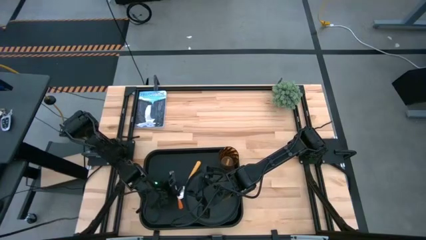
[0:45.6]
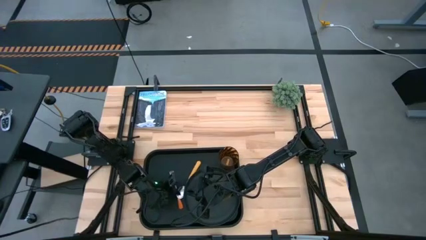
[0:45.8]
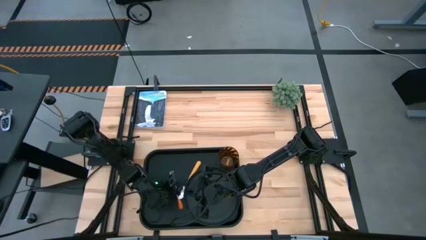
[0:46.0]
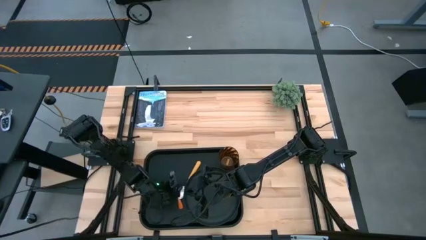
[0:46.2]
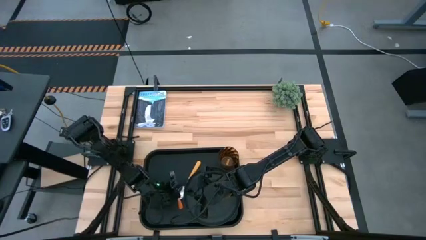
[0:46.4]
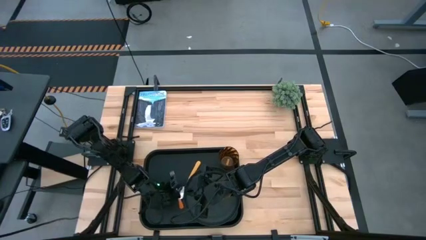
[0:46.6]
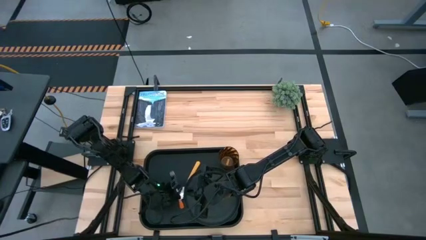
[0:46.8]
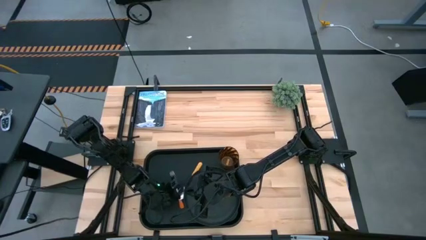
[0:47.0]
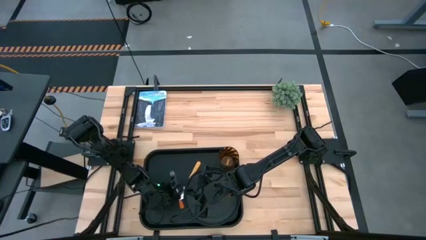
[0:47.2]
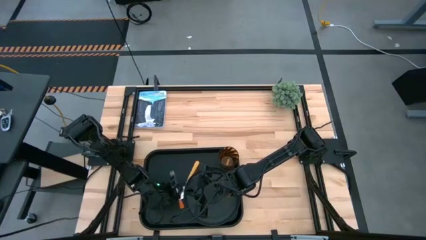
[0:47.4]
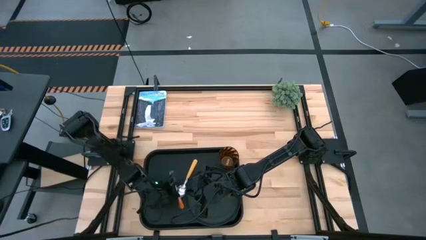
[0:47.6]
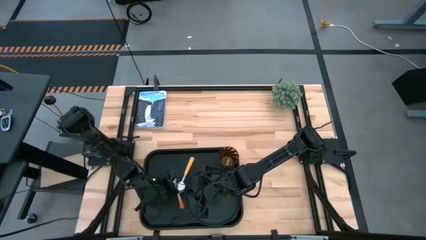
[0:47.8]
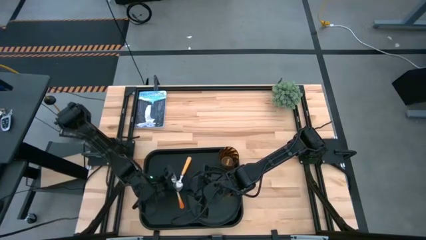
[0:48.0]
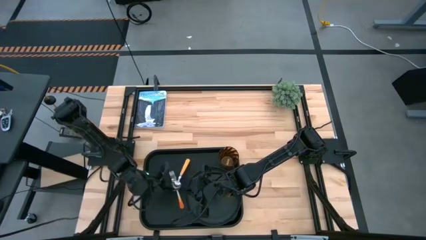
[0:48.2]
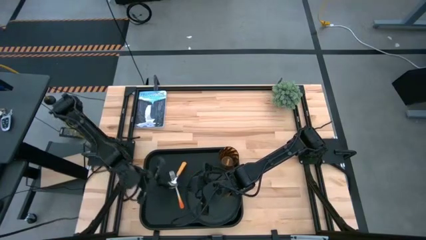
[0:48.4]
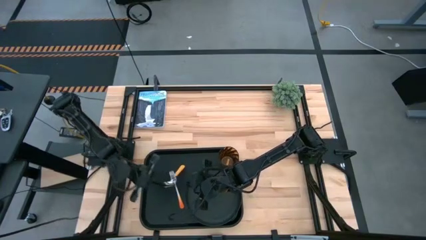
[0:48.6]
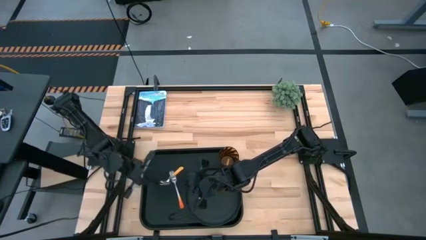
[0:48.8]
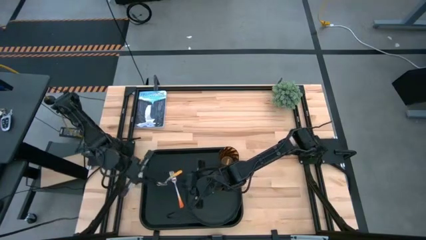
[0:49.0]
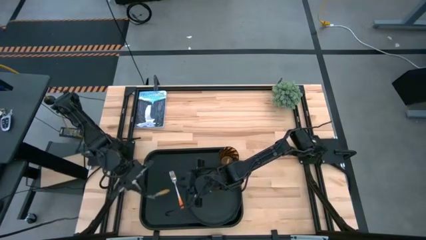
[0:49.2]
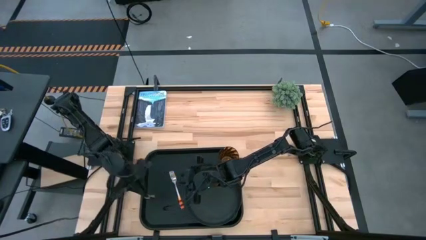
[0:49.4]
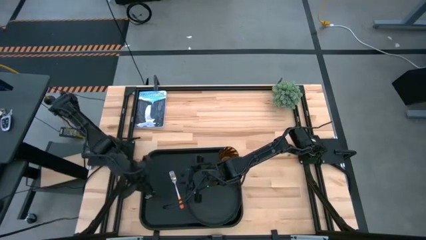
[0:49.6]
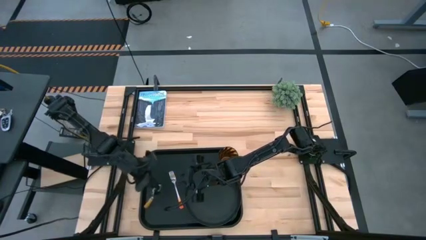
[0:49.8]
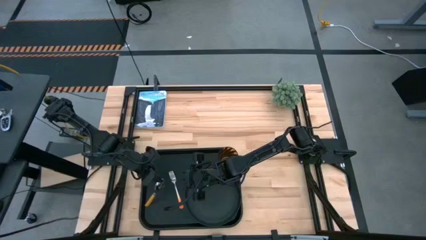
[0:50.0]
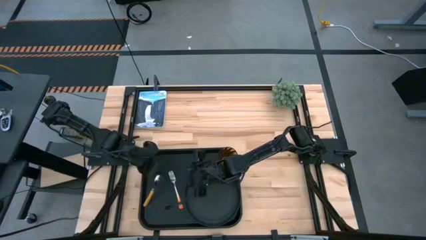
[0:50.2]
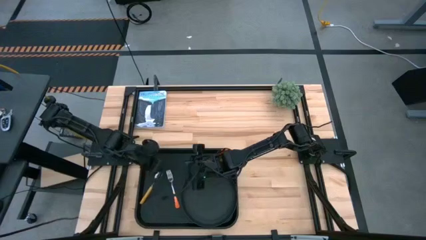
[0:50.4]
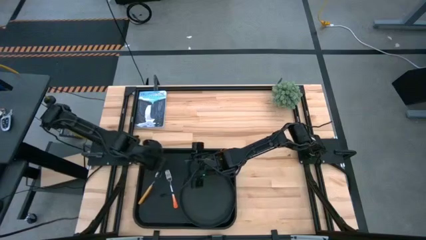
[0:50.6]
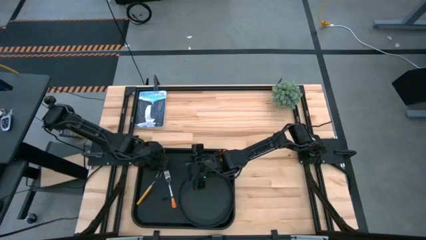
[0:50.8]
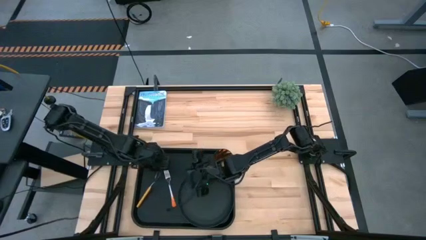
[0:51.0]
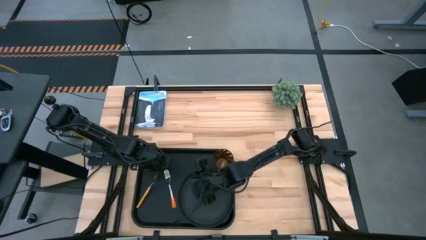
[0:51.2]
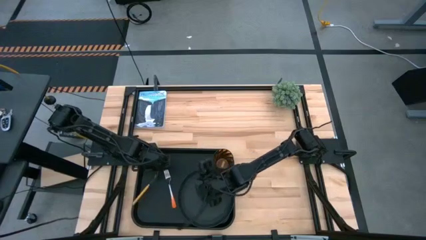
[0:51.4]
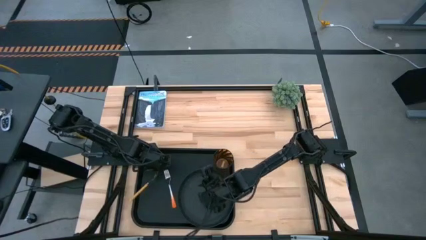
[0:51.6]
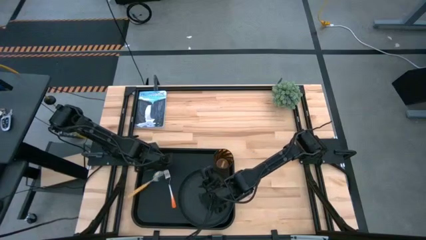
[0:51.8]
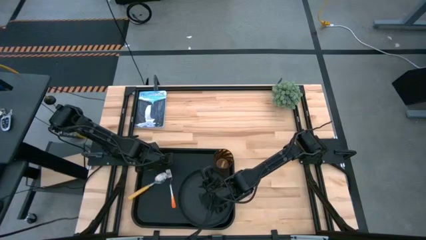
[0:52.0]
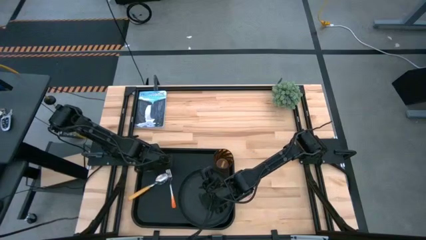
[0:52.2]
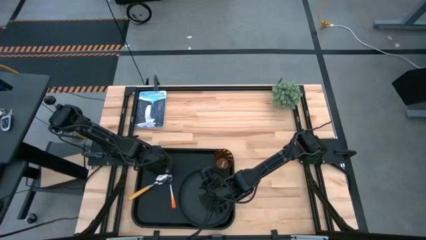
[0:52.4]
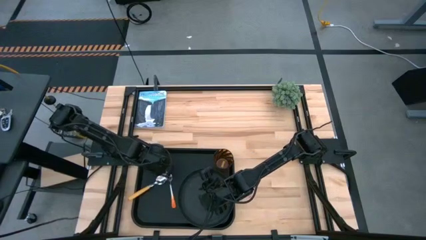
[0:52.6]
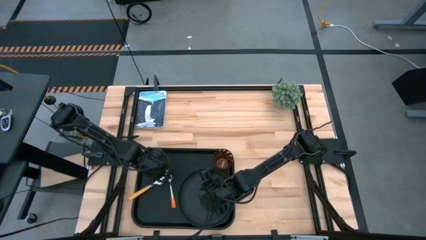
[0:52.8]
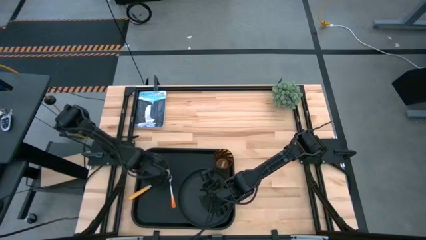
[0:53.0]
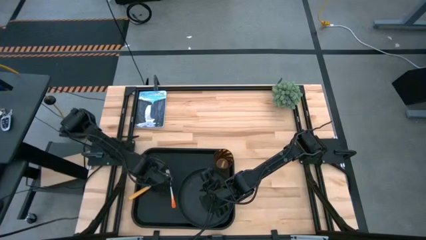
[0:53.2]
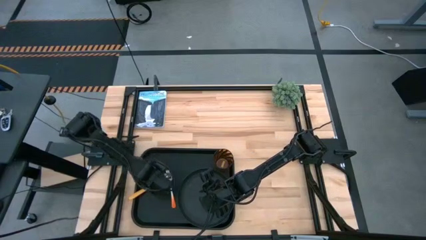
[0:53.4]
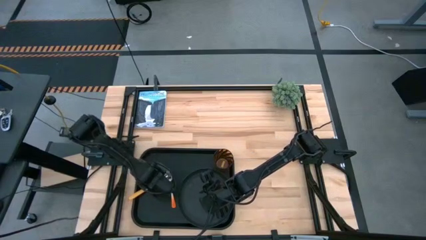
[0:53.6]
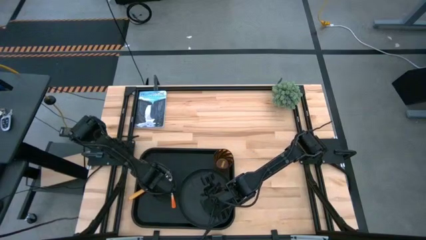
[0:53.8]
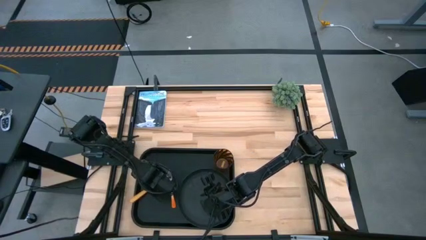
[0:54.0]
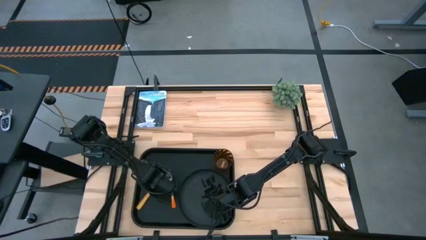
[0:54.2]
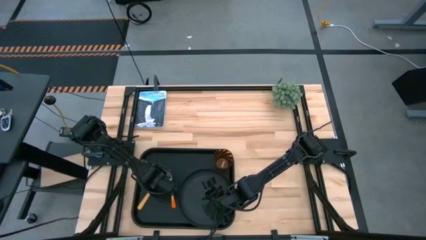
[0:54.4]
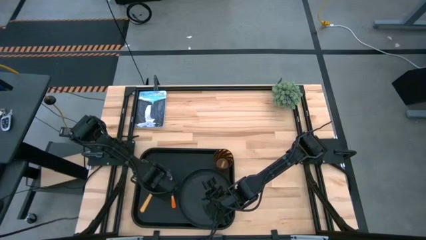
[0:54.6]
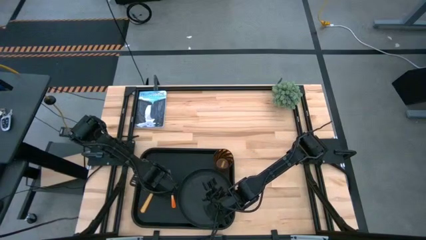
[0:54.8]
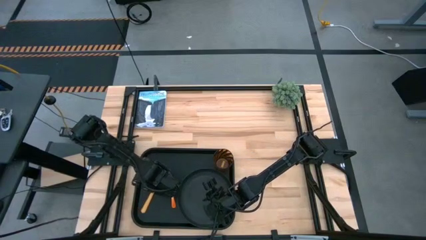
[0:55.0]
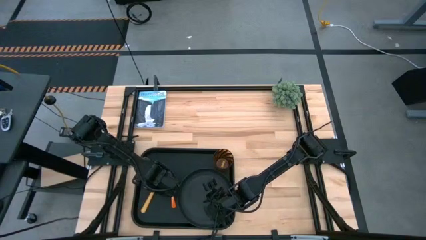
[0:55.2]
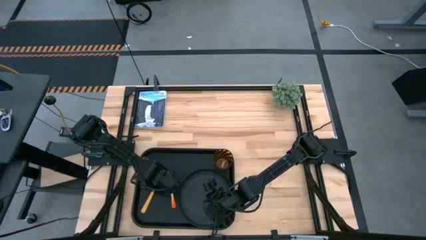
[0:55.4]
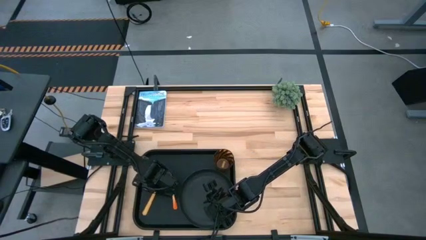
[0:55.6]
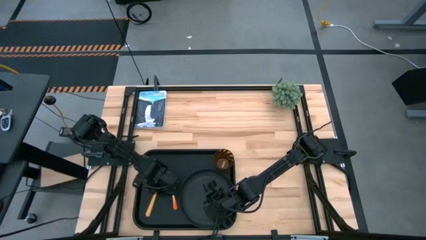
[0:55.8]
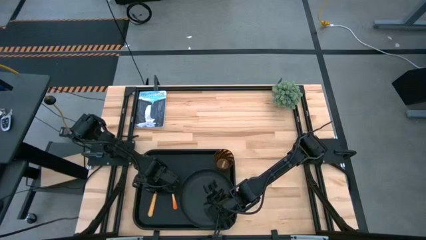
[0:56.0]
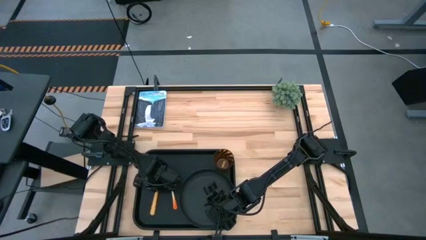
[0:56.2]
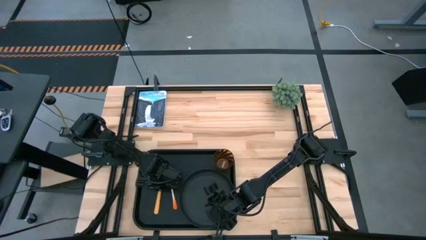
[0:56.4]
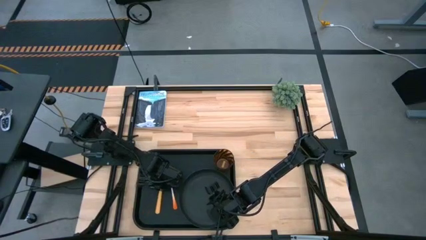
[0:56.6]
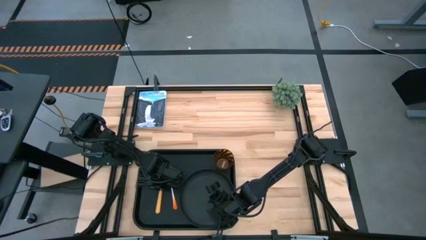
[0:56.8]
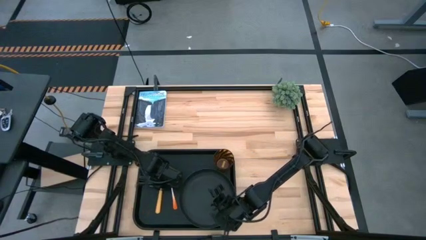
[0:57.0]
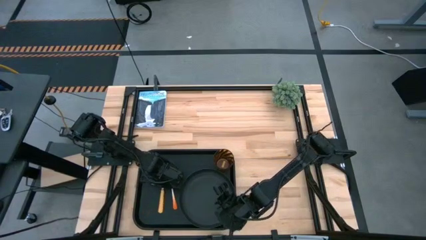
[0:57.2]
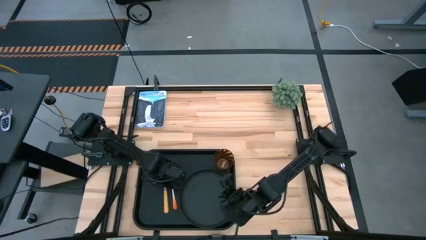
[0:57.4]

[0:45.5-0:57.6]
Task: Pick and place plate/cup/fork/spoon on tray
Put the yellow spoon to the left of the orange fork on the black tray

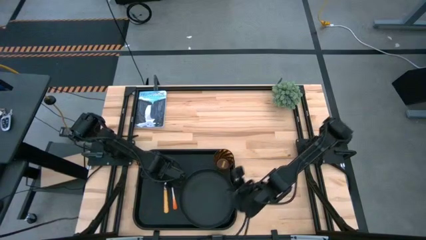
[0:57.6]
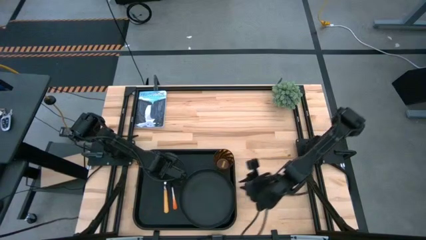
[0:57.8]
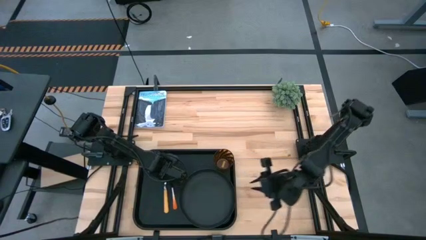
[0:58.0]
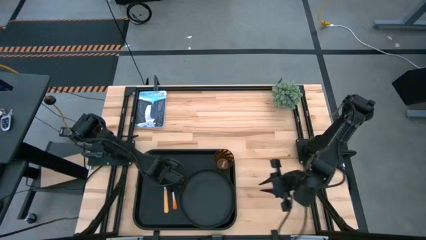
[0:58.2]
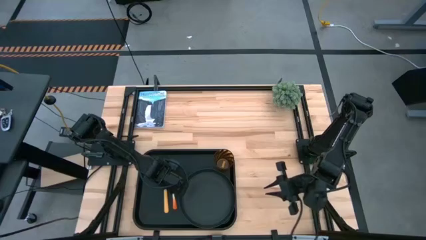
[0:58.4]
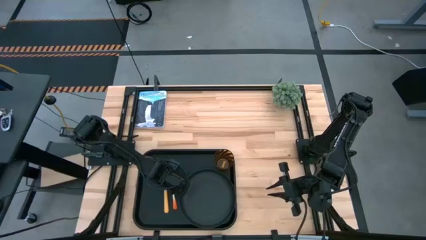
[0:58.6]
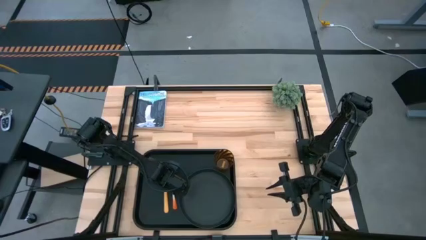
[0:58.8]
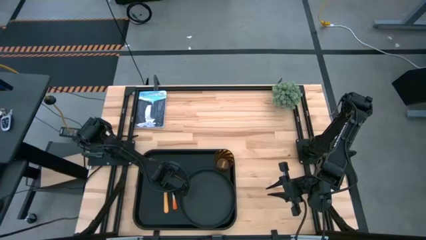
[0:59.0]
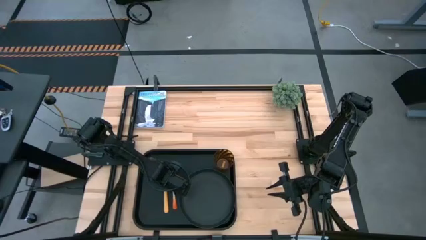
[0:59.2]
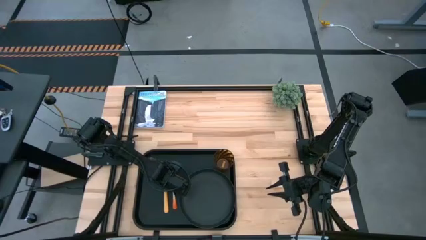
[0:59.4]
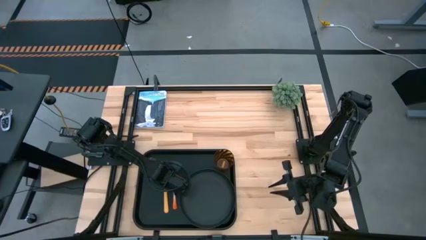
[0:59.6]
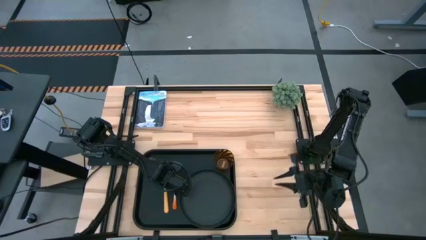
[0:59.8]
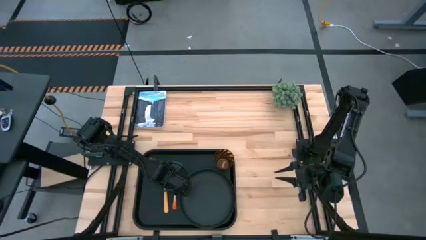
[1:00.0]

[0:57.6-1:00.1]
Adjust the orange fork on the black tray

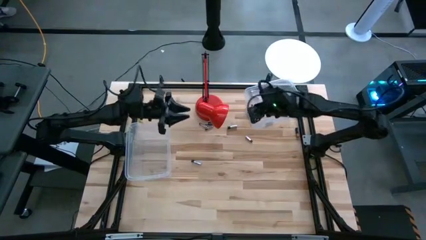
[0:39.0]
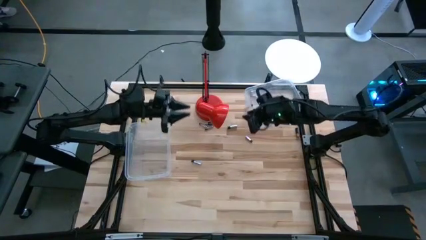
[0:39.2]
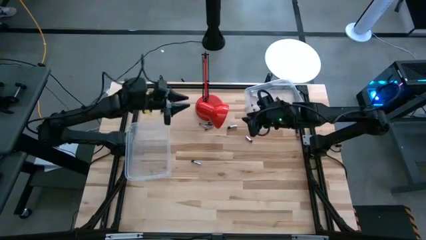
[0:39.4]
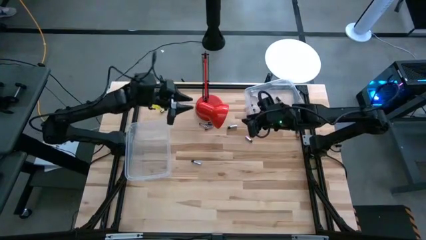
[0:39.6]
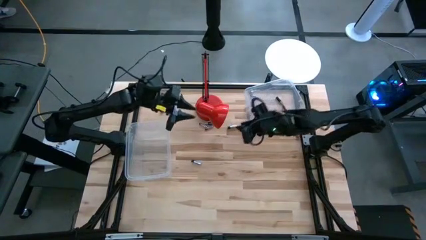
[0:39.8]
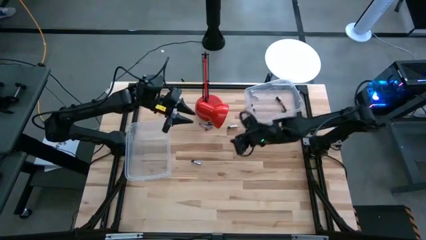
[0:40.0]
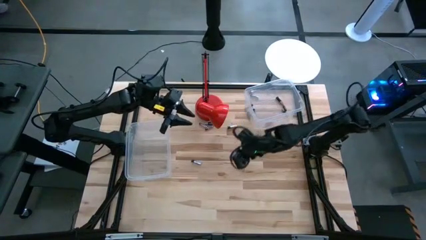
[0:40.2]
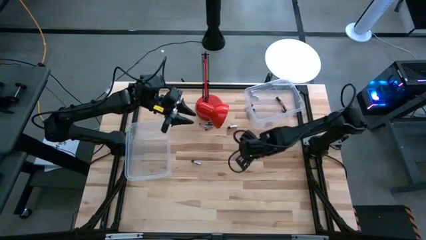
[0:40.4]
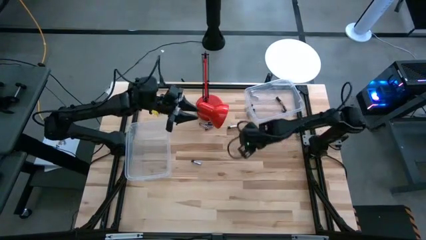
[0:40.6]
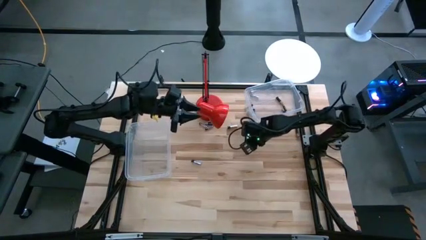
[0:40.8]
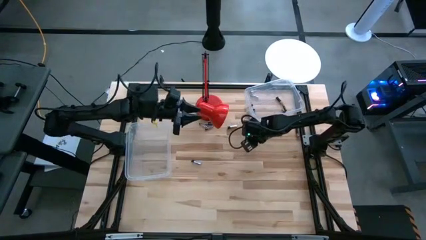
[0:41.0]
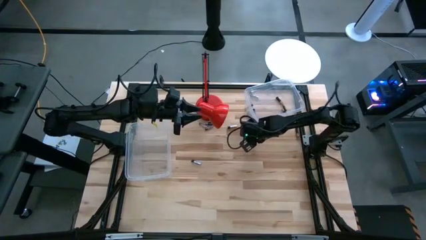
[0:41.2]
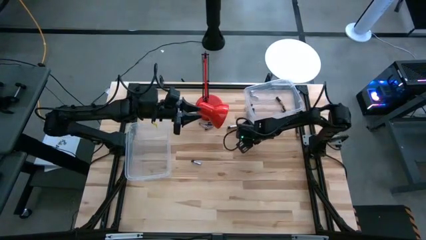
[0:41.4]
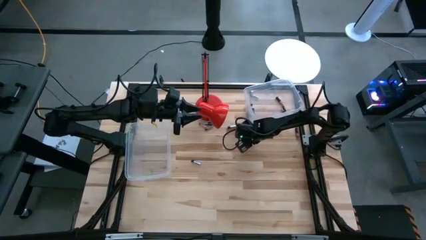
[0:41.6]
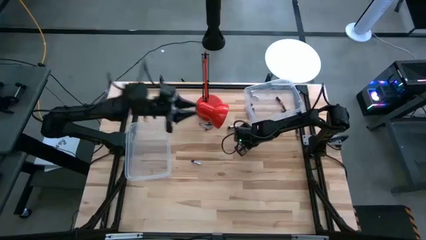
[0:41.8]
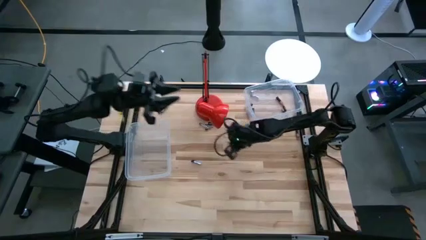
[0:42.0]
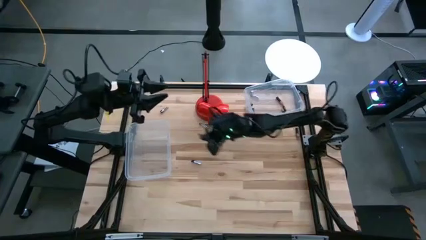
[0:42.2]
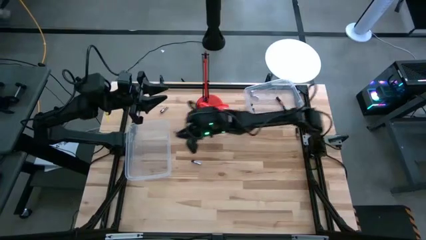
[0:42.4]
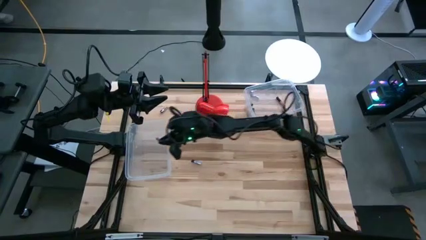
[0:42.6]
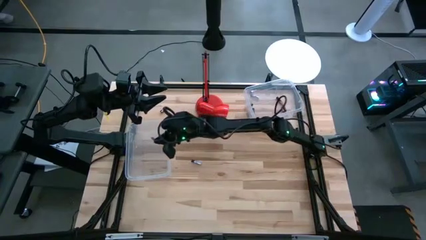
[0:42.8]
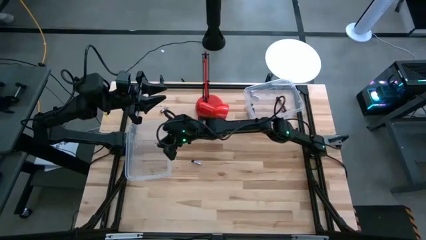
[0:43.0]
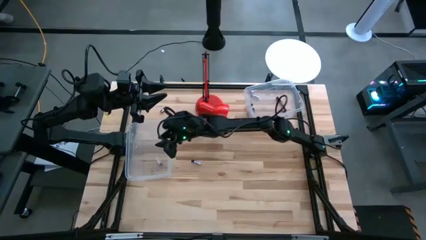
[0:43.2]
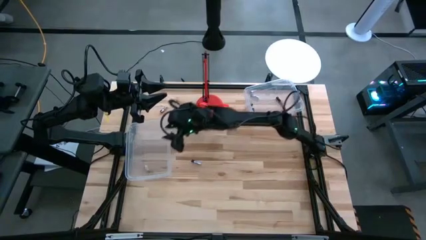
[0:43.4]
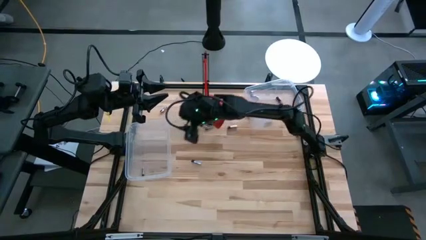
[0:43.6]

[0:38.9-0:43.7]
Task: Sort batteries
Put the silver battery into the bottom transparent bin
